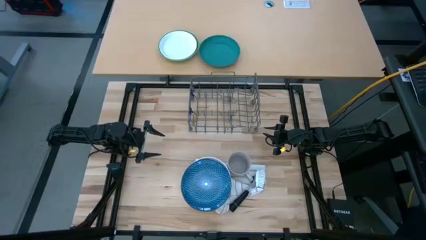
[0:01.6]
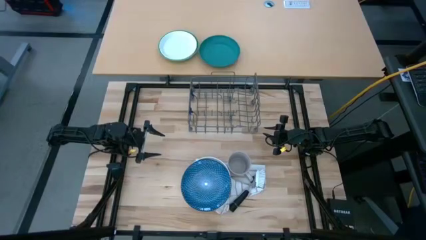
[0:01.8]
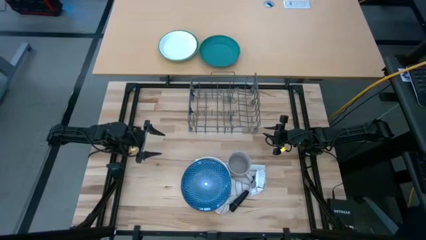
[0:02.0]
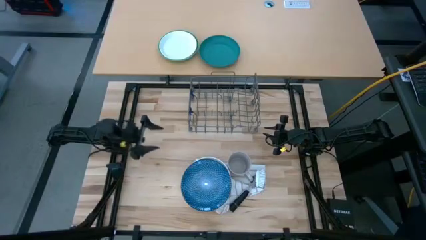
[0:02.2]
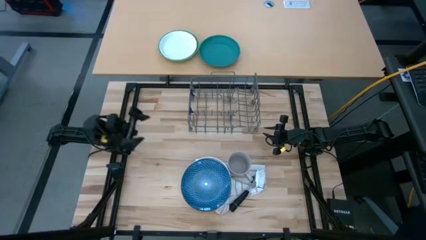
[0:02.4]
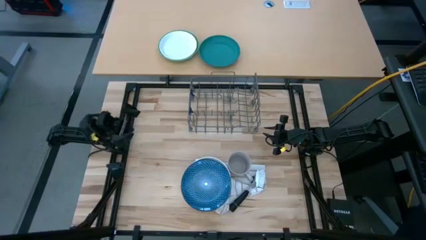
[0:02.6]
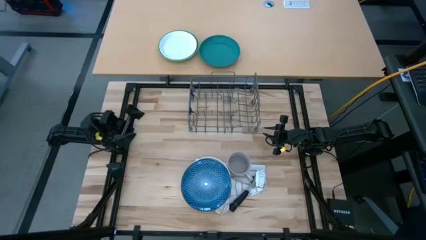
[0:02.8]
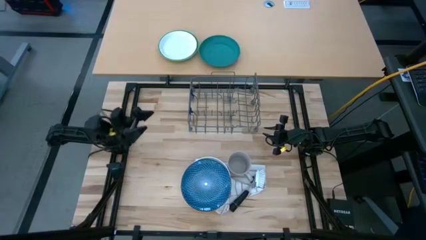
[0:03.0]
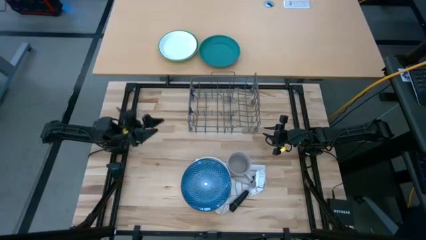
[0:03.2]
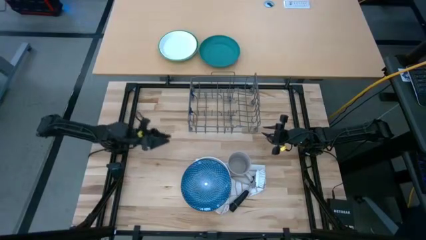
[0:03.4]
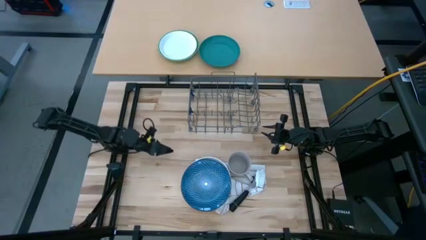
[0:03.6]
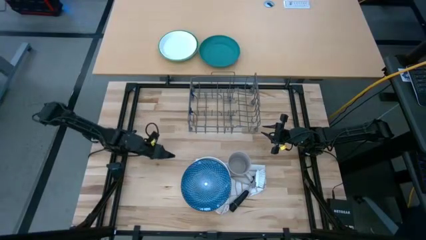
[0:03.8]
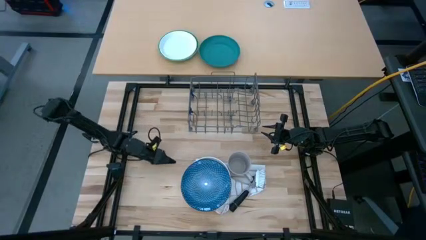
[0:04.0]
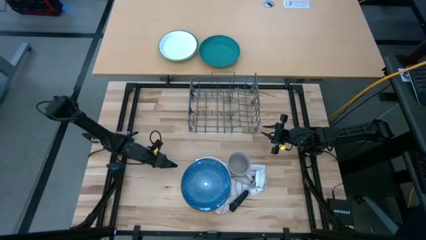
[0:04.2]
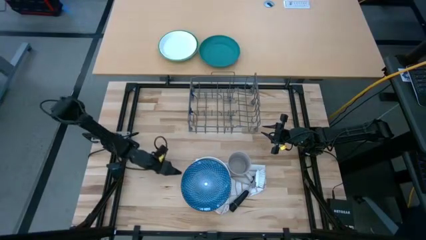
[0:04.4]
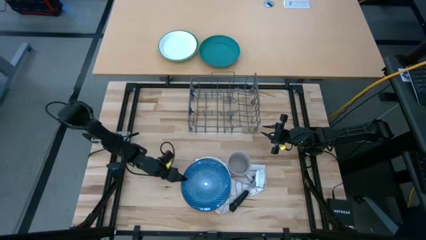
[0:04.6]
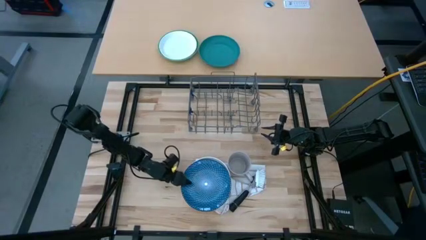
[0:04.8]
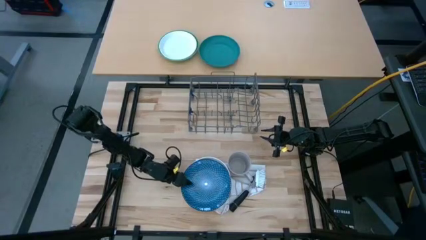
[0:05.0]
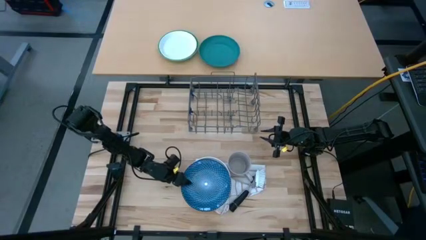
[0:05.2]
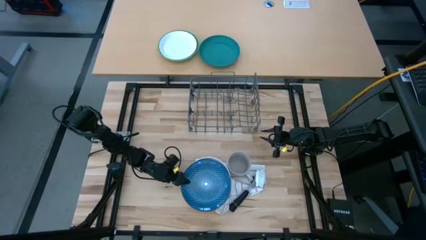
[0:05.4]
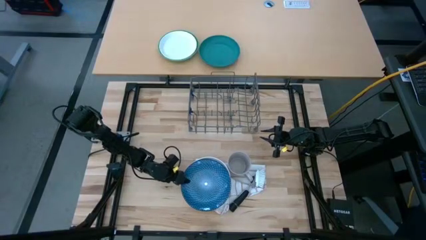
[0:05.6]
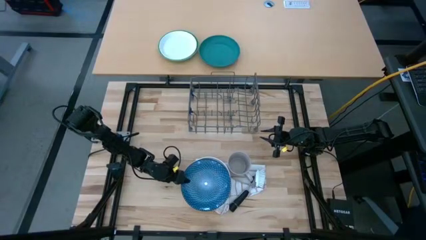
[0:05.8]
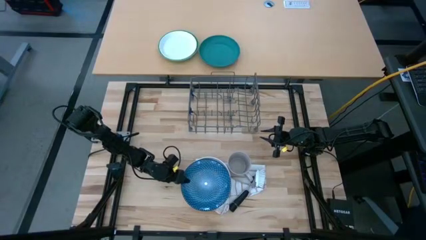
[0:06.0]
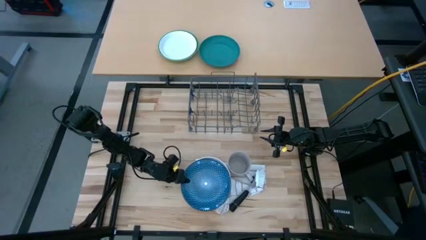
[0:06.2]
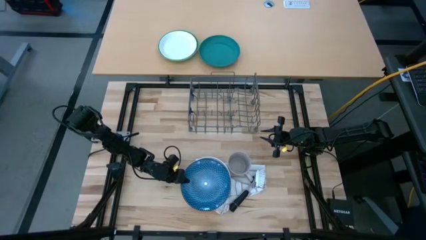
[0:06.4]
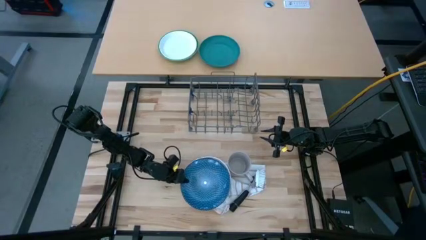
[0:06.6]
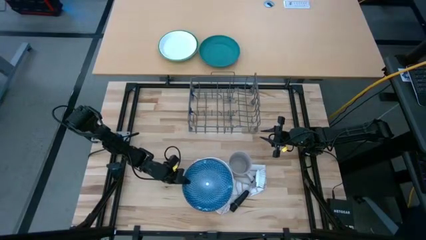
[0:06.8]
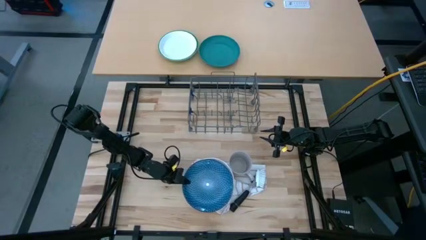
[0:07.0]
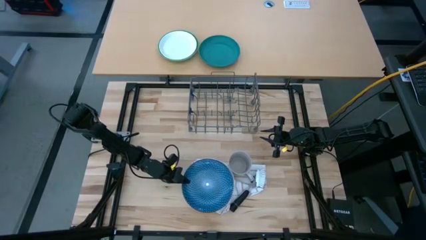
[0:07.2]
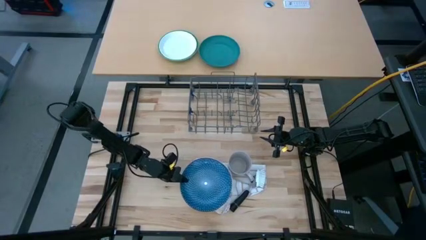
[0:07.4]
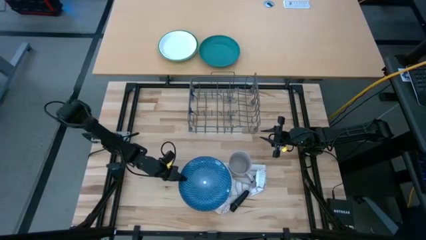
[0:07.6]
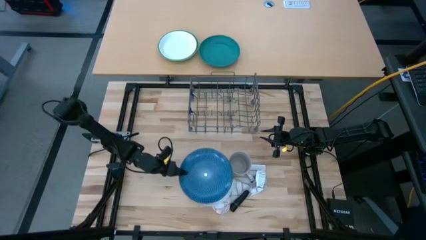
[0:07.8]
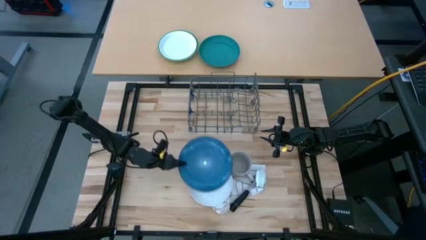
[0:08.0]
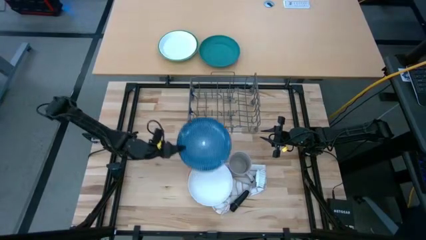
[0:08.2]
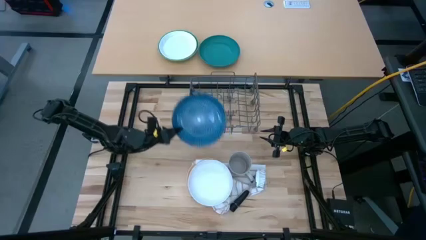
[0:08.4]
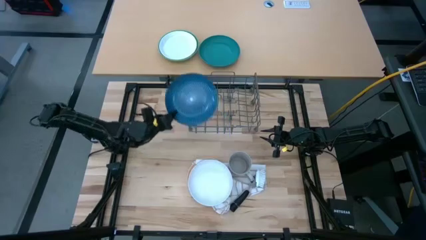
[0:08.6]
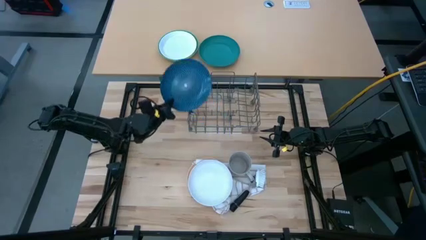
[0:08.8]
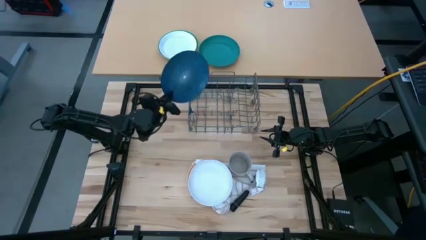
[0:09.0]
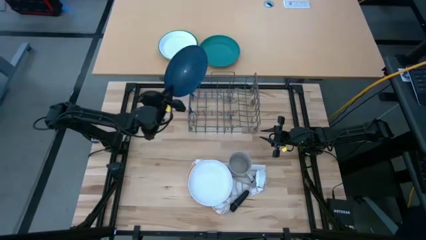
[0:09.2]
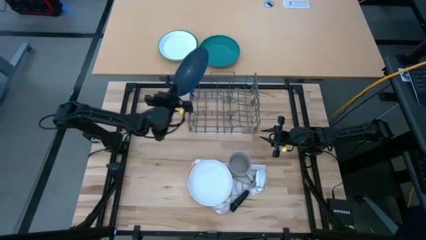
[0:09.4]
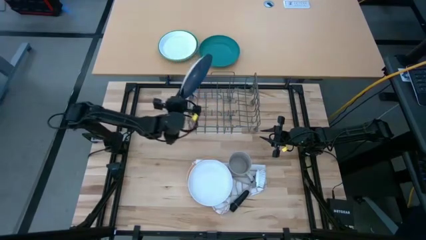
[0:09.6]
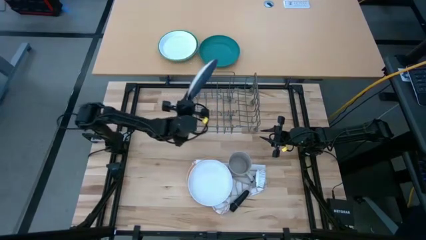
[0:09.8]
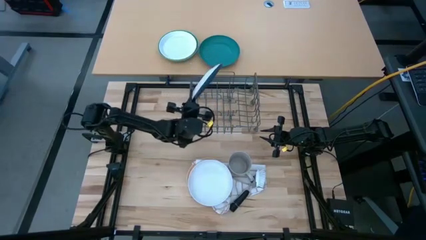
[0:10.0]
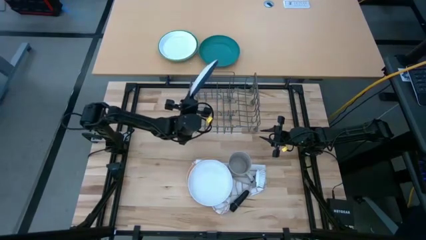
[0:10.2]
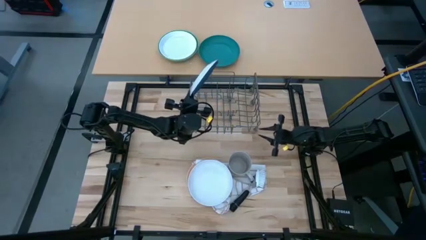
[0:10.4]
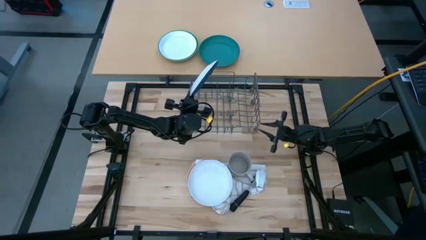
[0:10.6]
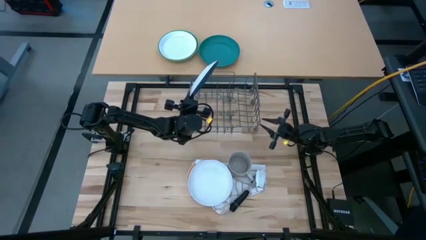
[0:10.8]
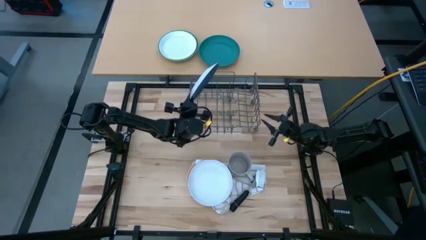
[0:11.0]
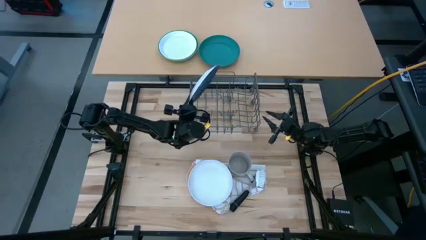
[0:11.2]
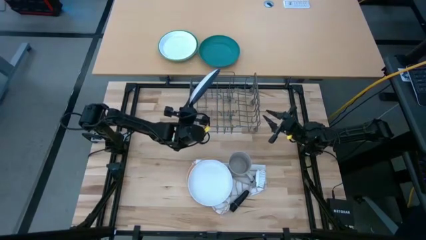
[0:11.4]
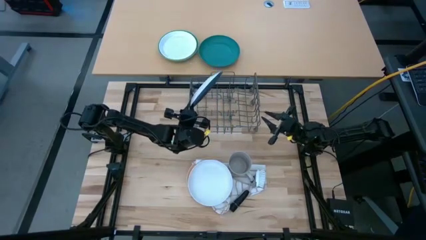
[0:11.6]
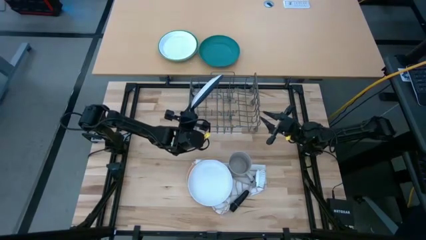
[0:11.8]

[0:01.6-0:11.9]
Task: Sort dishes
Put the blue plate into the dish rack
